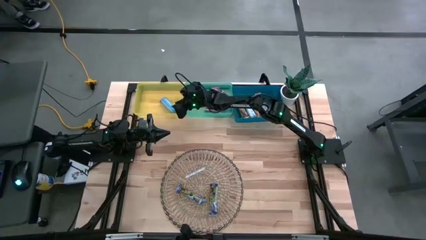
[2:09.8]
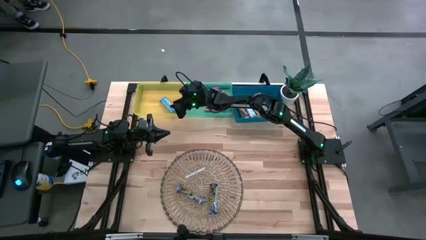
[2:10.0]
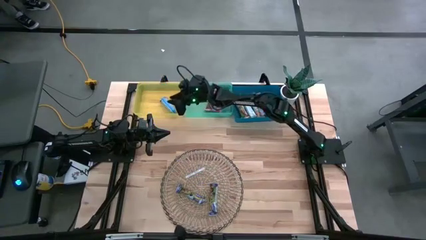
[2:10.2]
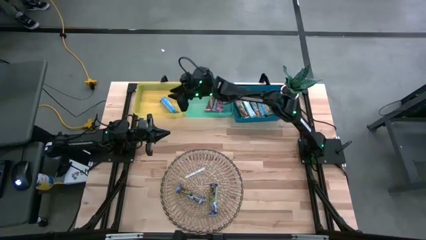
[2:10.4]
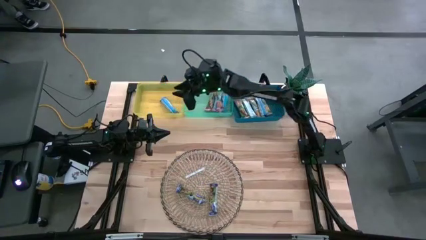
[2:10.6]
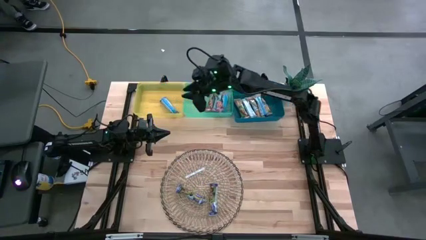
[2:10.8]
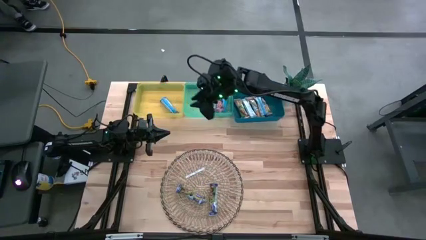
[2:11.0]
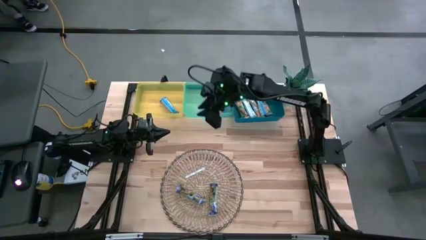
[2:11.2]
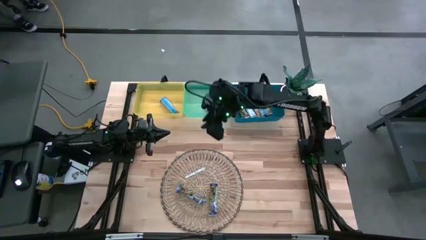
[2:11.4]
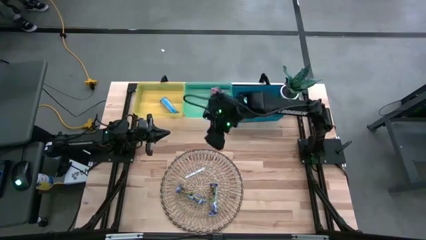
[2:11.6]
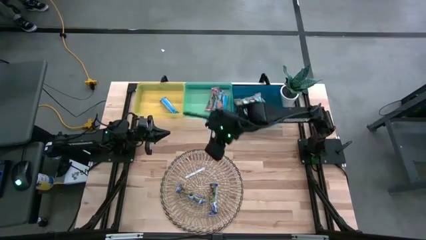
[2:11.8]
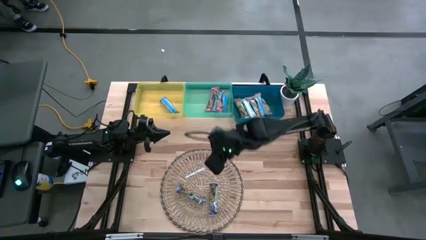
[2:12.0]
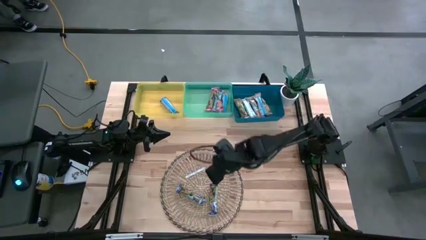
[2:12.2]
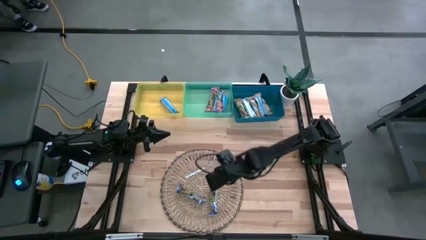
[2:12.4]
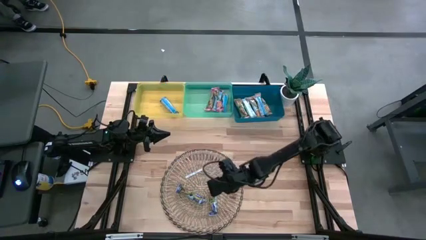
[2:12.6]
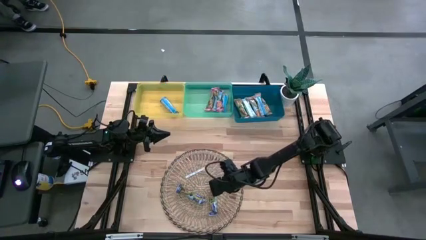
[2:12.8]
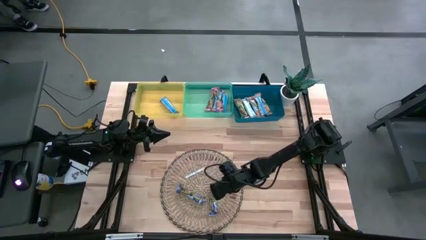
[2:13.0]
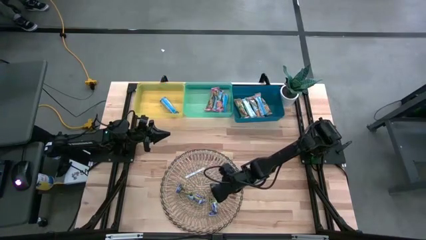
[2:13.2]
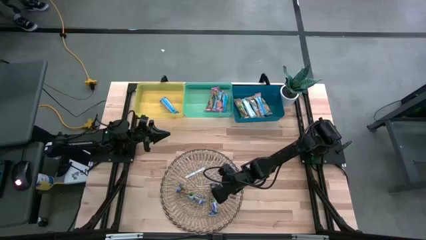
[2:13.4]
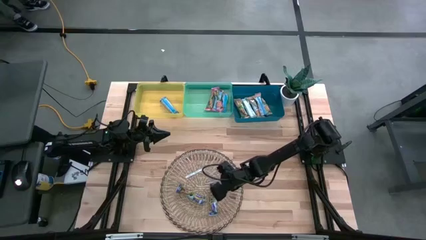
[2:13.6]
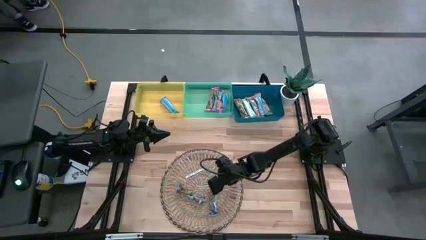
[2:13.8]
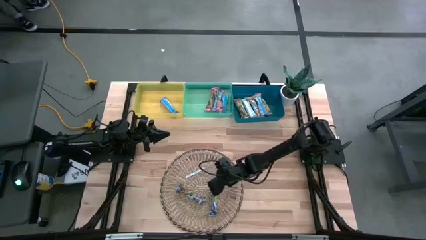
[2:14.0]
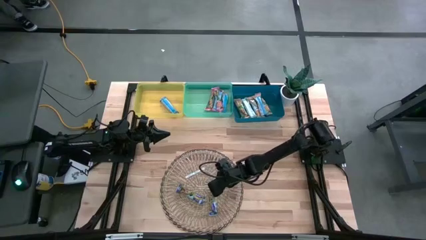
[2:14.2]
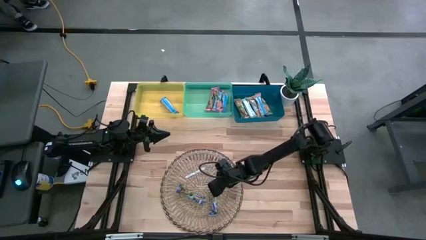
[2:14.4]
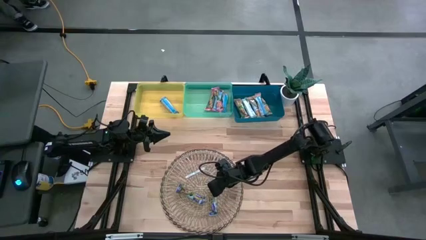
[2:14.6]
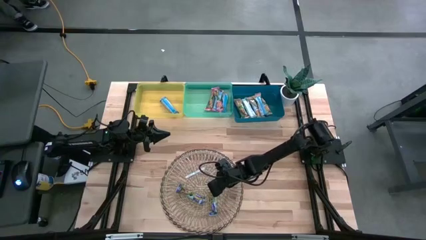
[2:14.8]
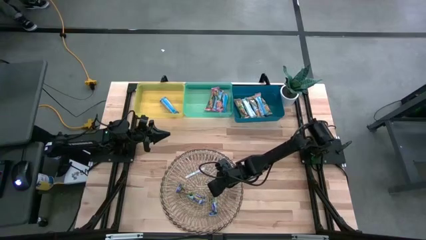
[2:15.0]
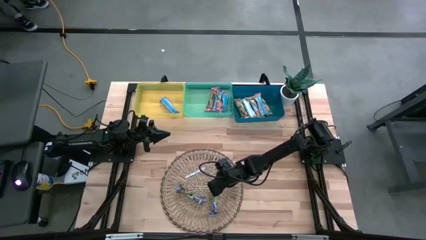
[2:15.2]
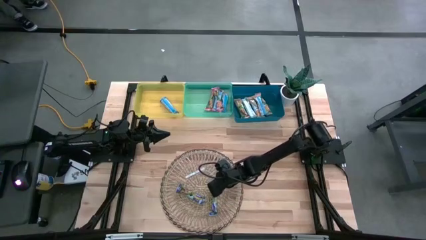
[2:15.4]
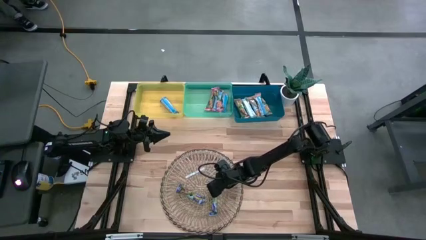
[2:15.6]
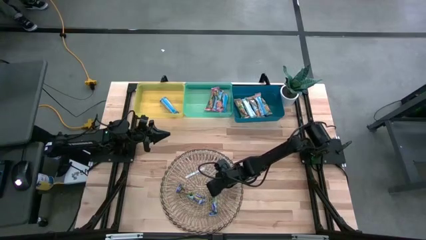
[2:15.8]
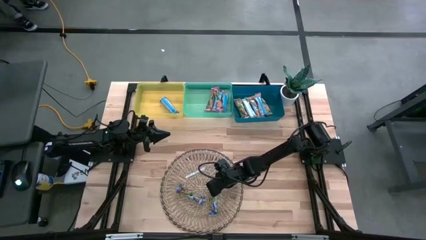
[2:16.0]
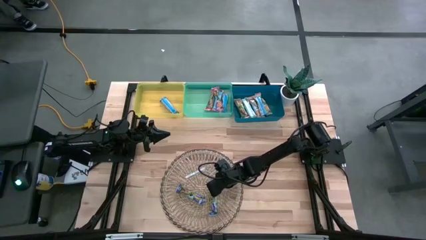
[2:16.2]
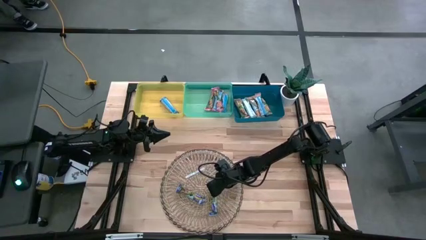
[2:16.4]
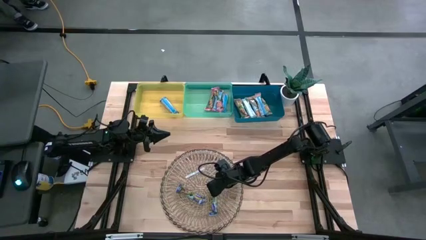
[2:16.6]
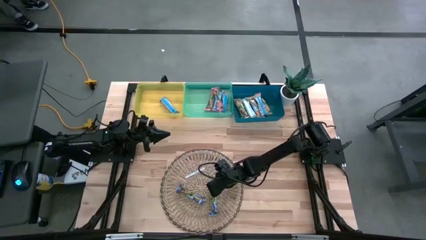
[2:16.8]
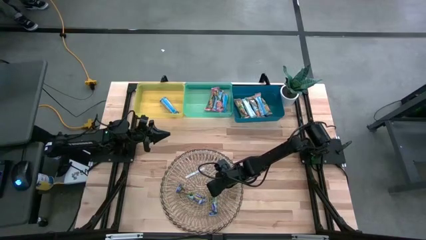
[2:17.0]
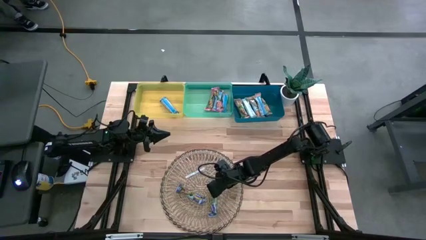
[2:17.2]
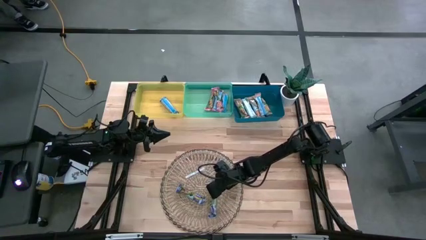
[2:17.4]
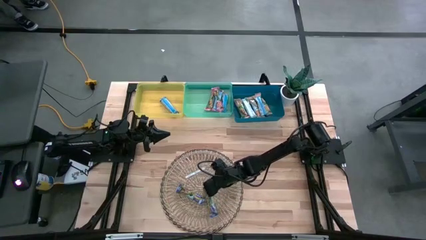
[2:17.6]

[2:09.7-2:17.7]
Task: Pick and place Granola Bars by type
Put the blue granola bar into the yellow bin

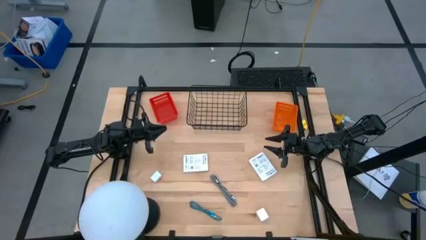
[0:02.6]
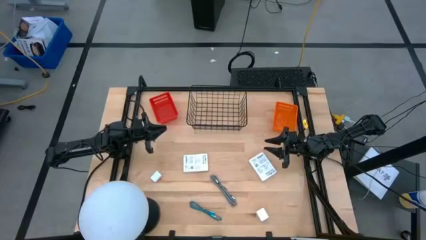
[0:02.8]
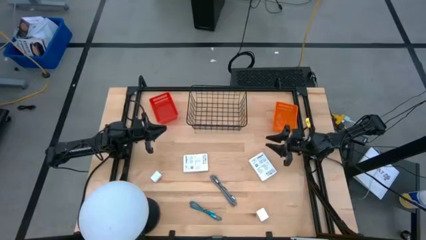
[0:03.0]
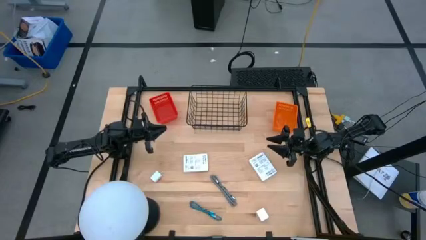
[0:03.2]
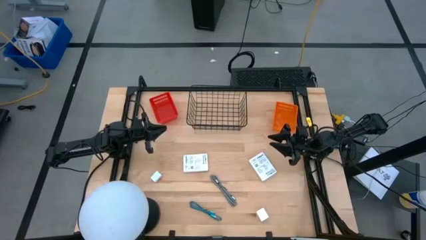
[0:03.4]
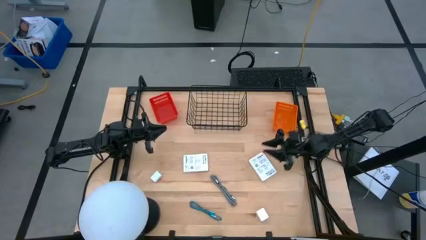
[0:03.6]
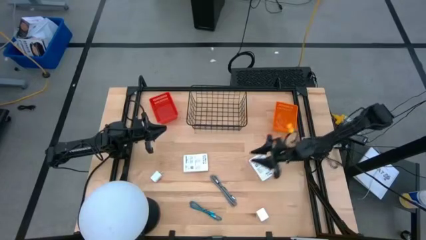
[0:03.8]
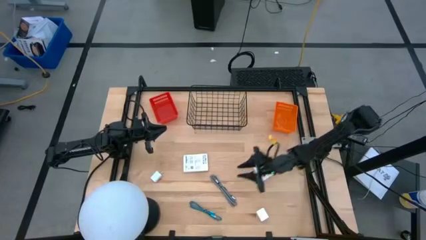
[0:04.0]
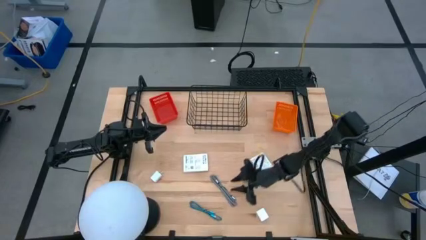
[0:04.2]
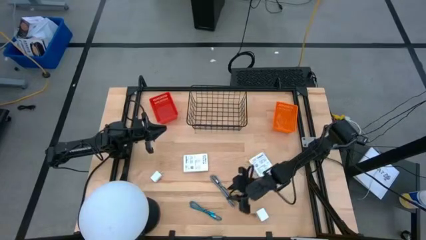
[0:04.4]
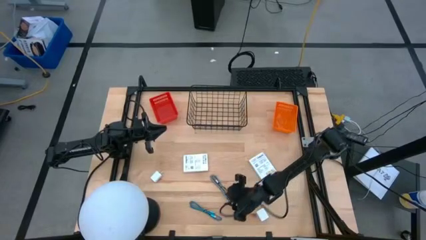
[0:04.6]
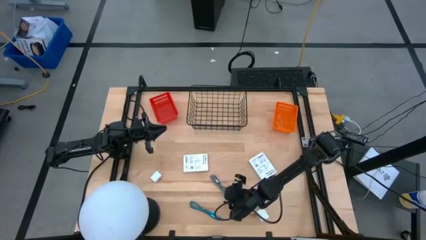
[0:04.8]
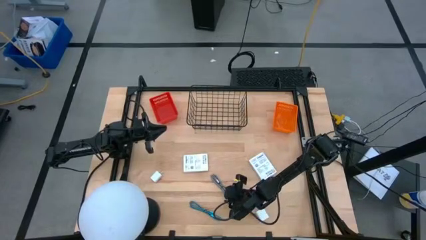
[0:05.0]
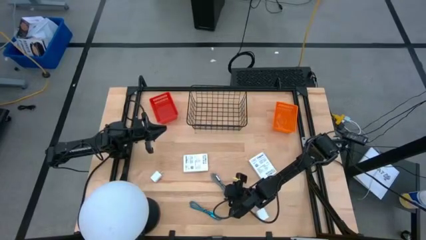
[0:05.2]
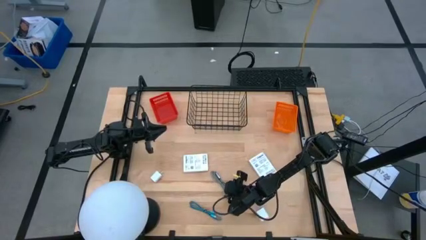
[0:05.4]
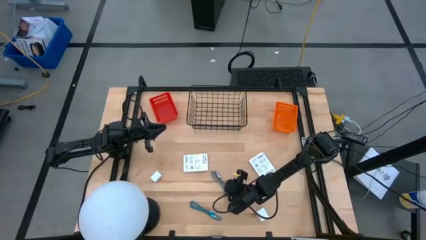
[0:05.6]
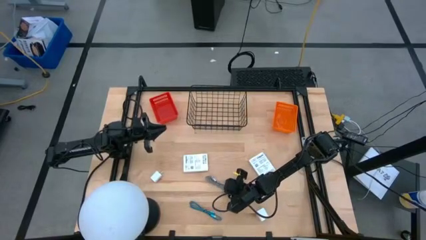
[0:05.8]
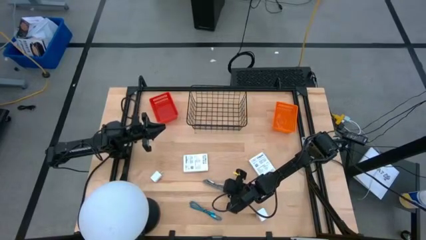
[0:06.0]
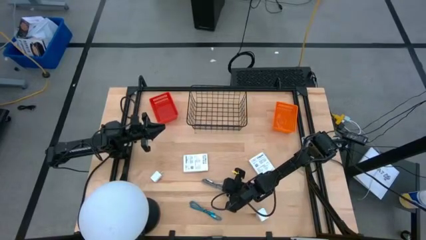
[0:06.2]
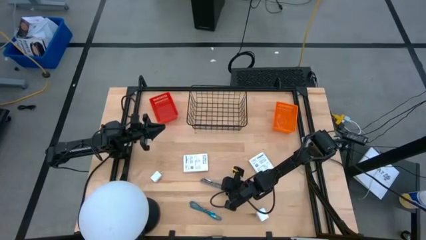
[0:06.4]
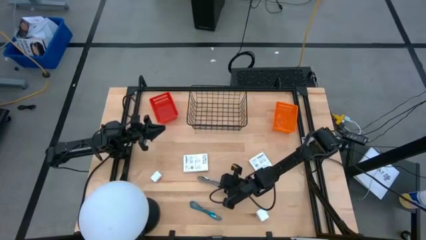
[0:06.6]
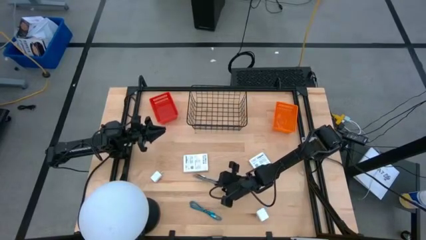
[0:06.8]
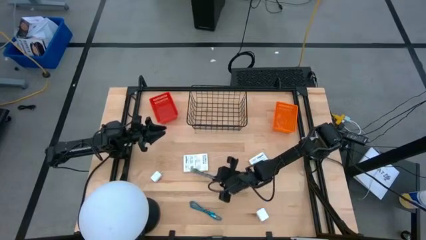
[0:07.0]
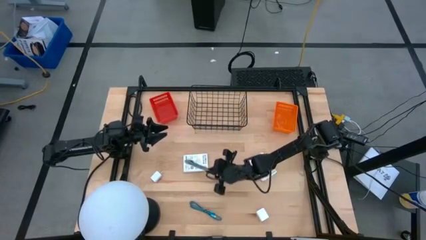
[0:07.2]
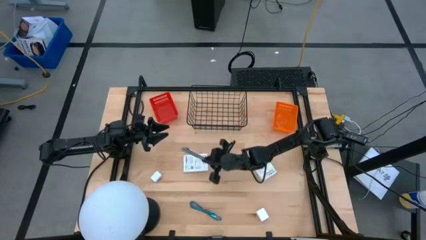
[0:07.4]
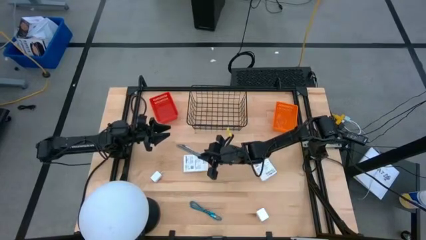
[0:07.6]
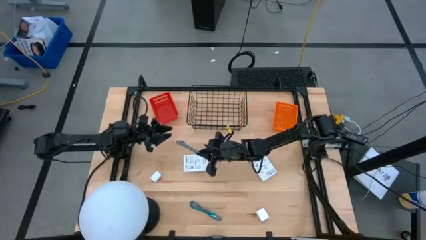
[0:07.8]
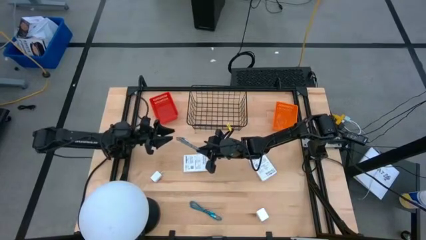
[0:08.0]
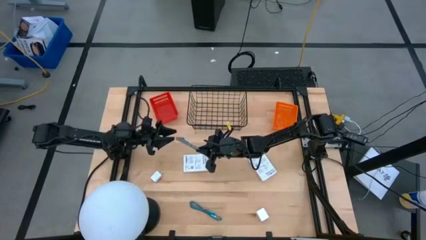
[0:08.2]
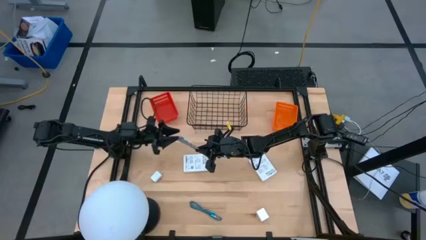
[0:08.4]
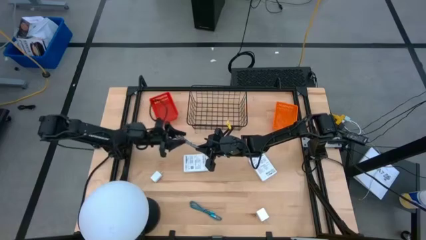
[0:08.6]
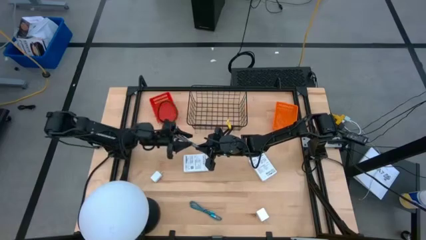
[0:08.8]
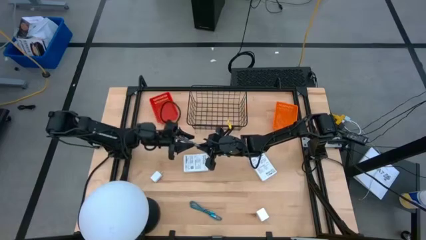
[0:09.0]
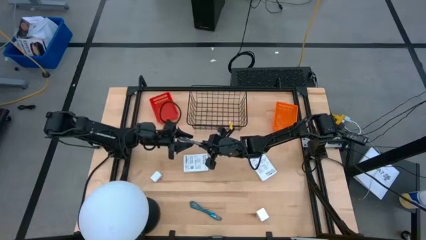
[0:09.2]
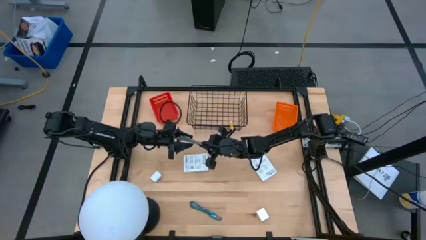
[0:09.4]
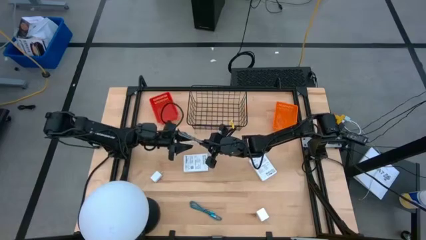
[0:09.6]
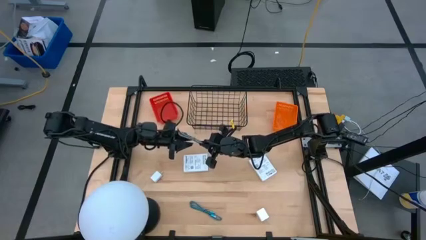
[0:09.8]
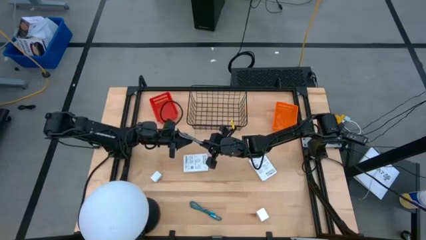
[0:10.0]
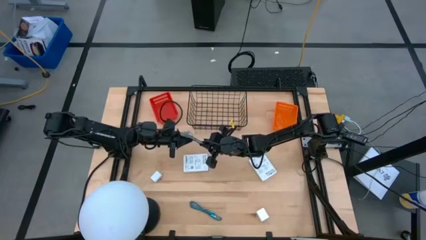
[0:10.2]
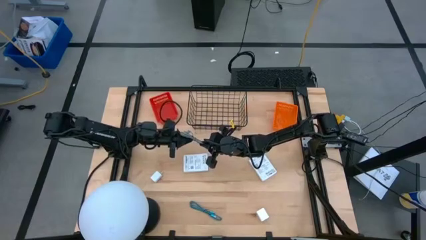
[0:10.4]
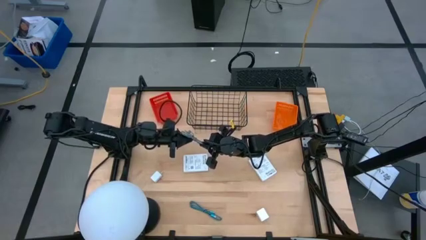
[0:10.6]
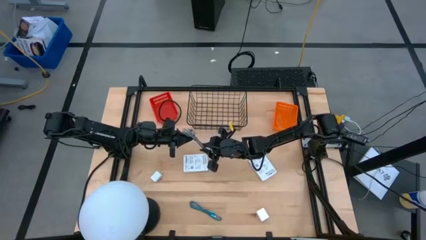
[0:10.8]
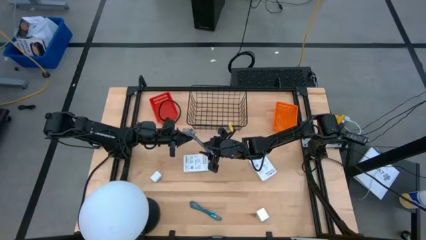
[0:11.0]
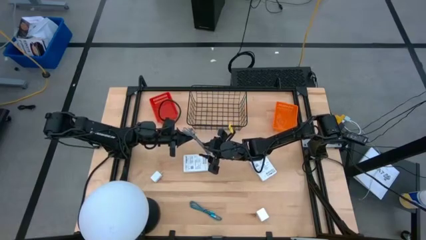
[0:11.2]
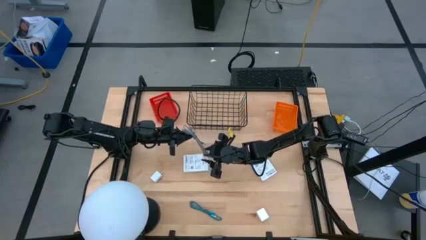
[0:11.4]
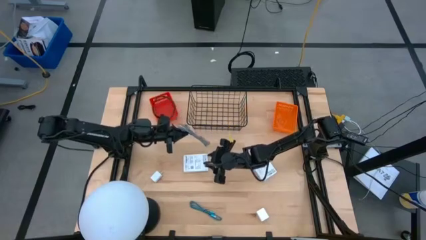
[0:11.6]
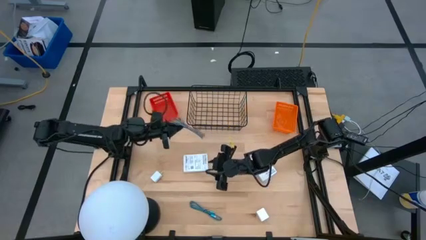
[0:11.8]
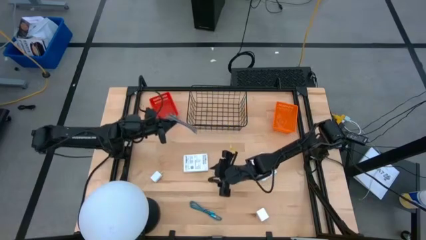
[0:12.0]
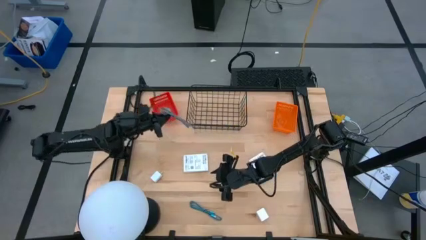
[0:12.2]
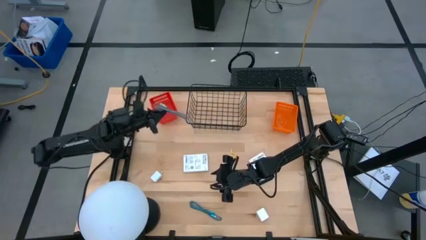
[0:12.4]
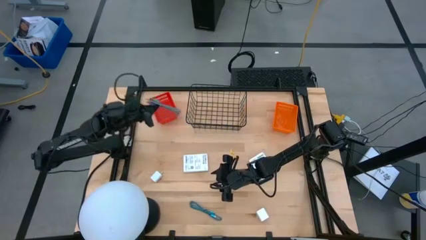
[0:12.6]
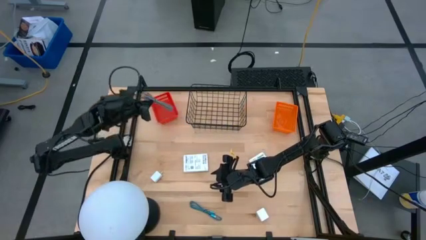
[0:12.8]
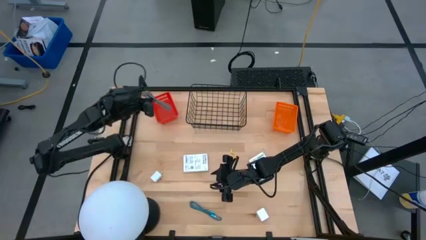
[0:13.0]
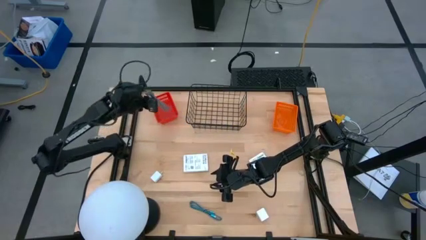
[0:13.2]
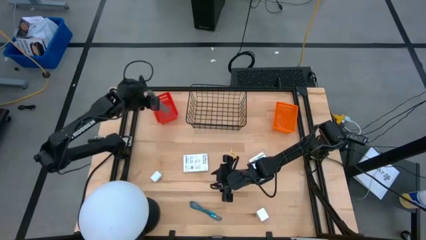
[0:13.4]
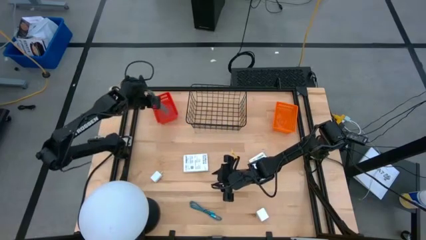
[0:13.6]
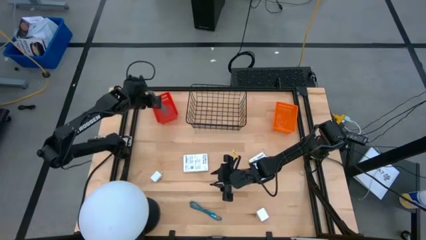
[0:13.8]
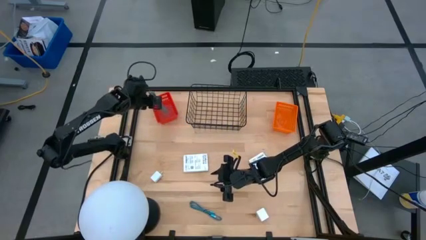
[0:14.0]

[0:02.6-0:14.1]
Task: Pick and place items into bin
Put the black and white charger cable into the red bin
